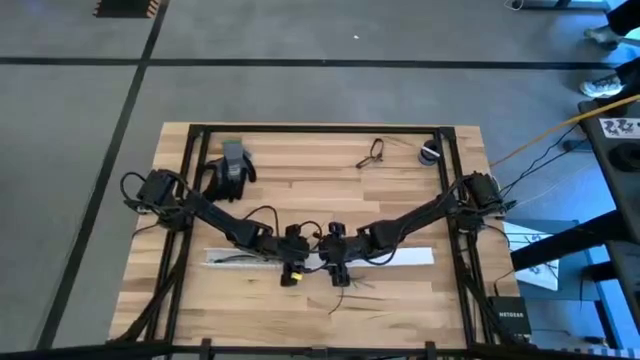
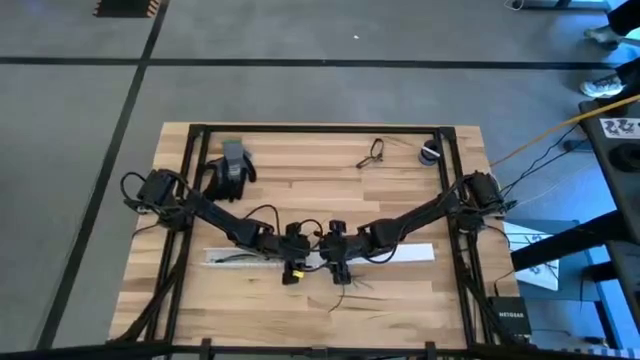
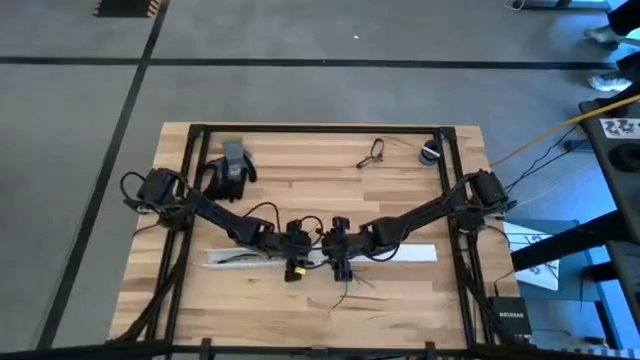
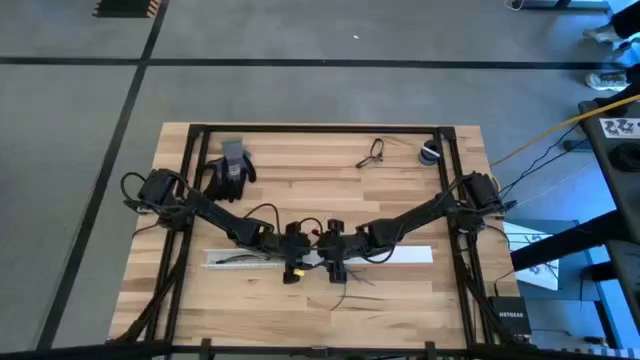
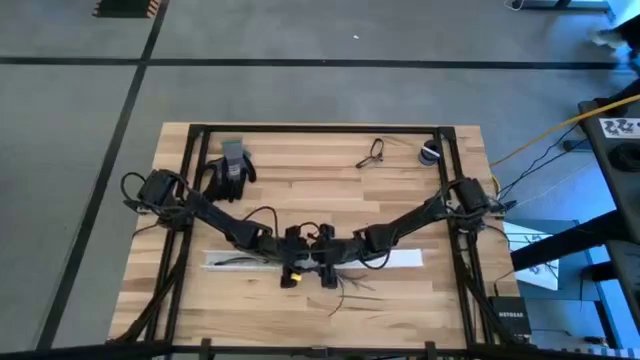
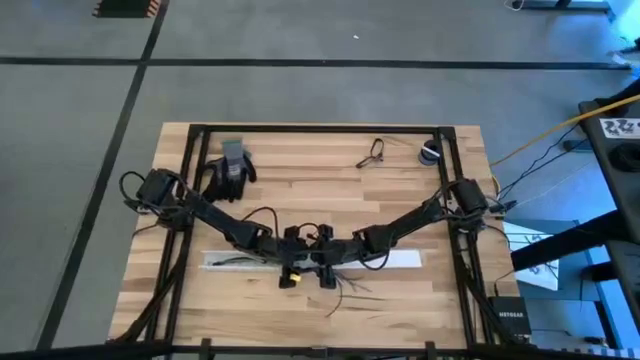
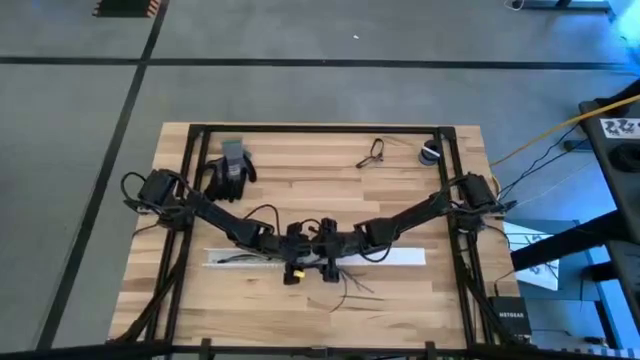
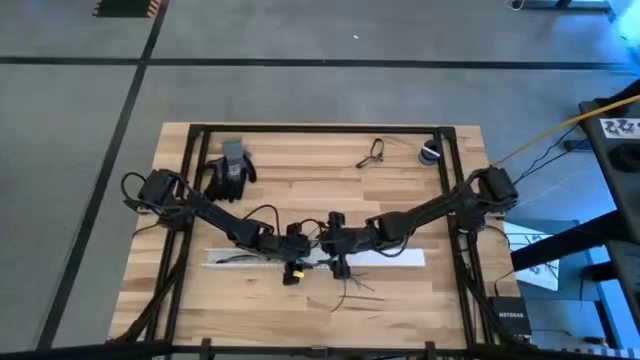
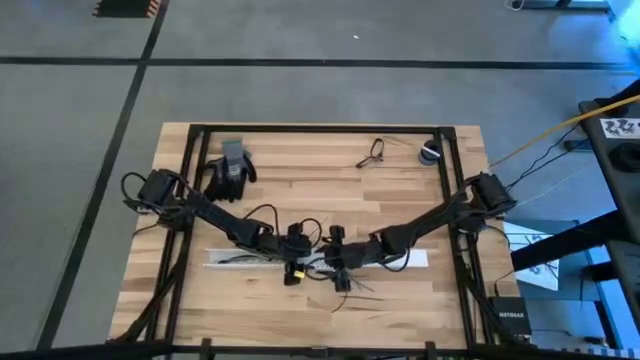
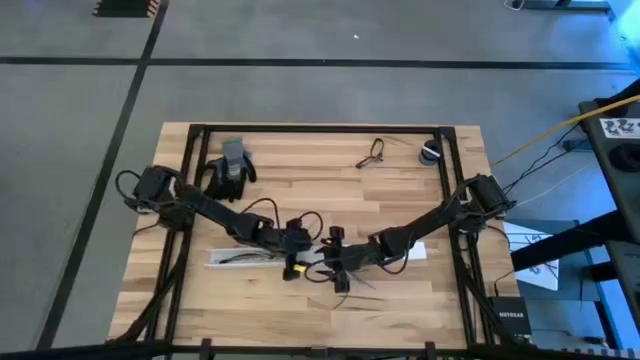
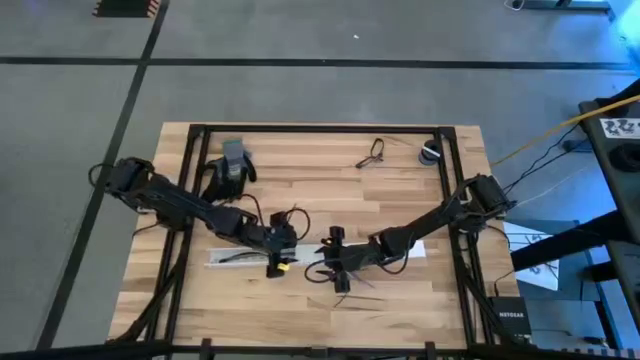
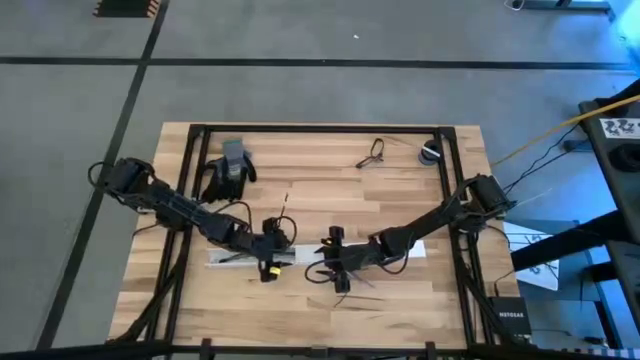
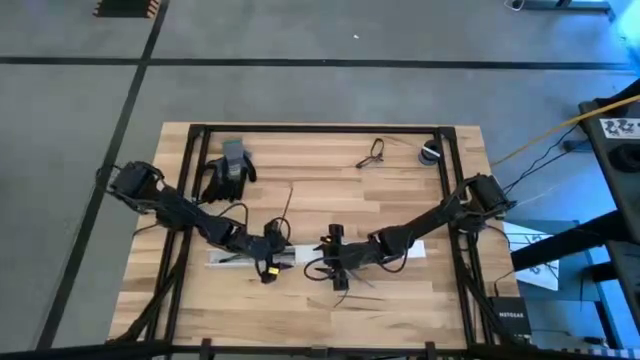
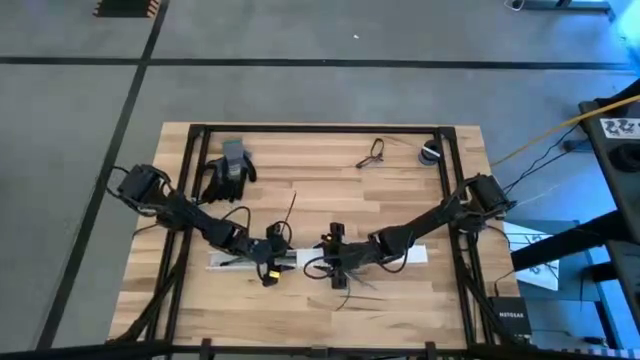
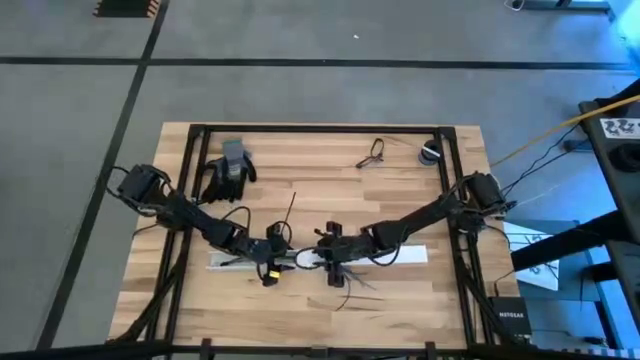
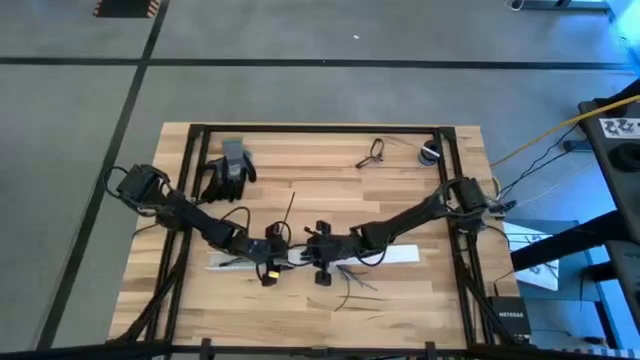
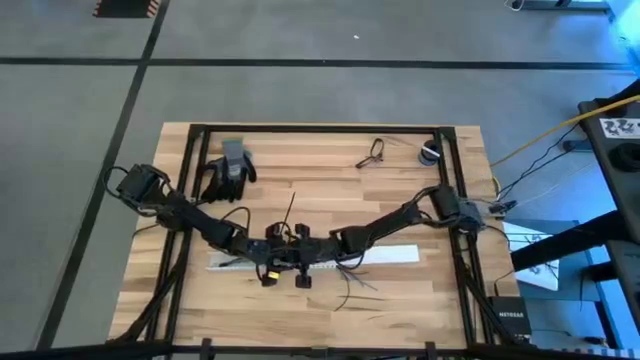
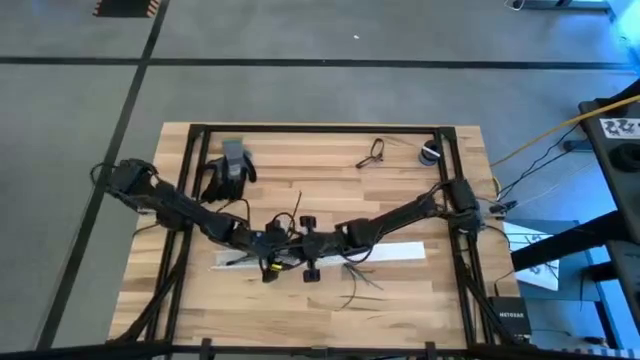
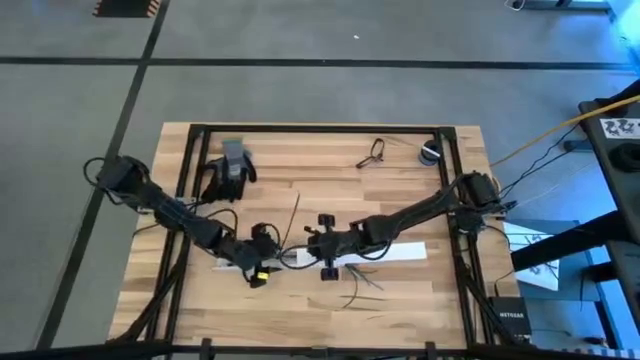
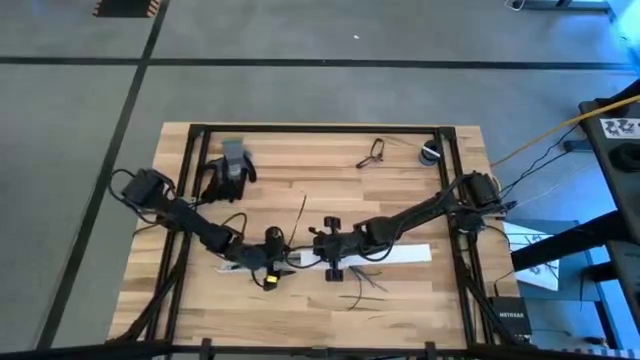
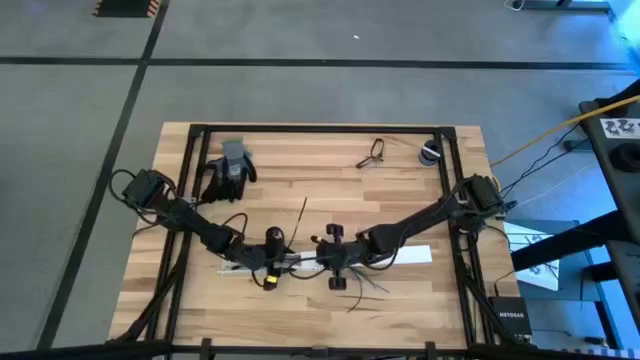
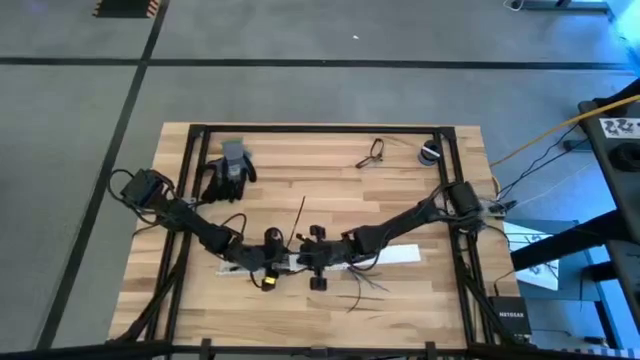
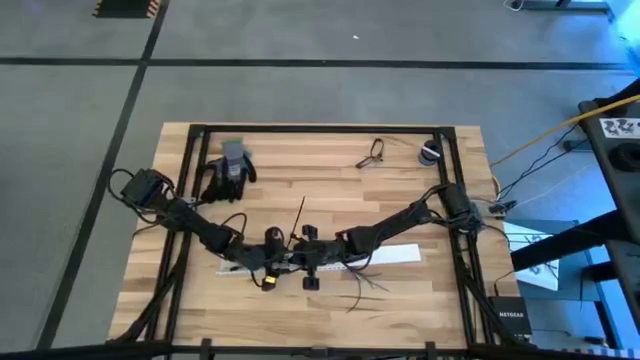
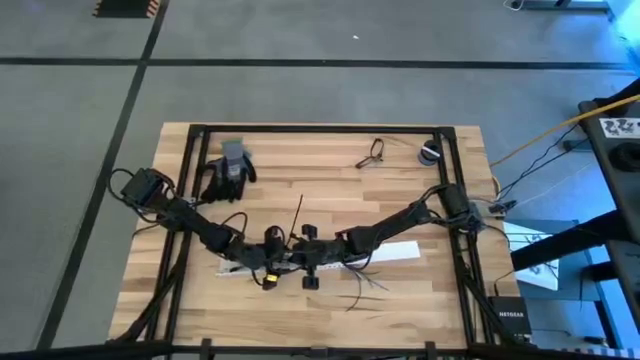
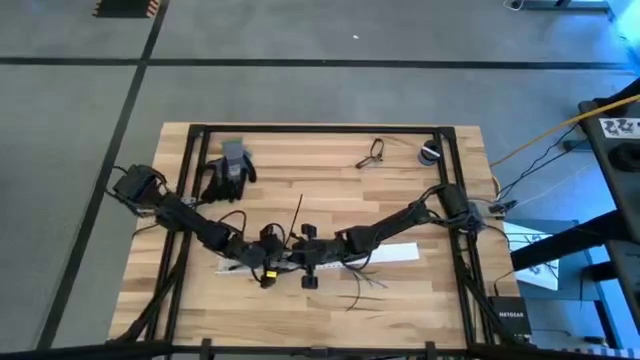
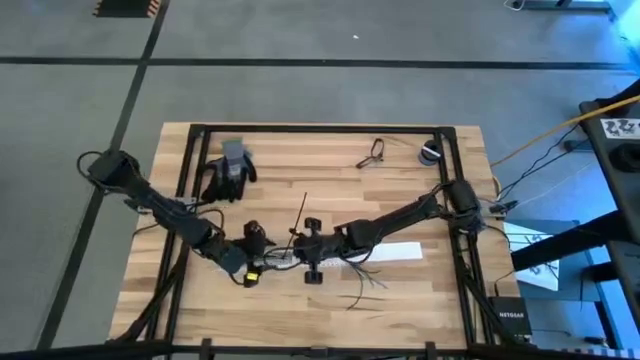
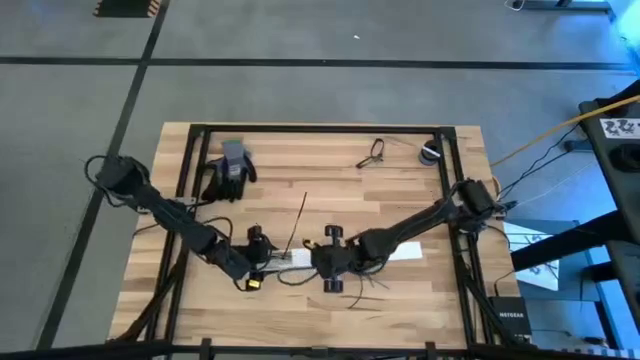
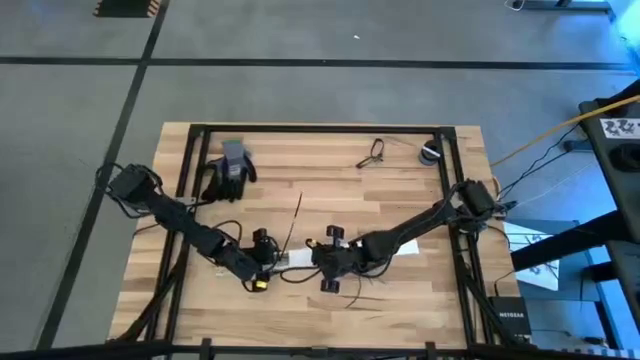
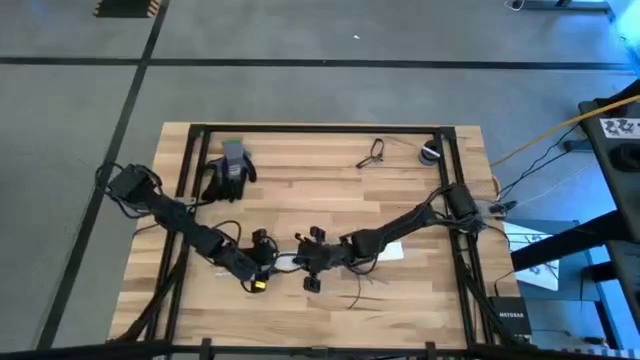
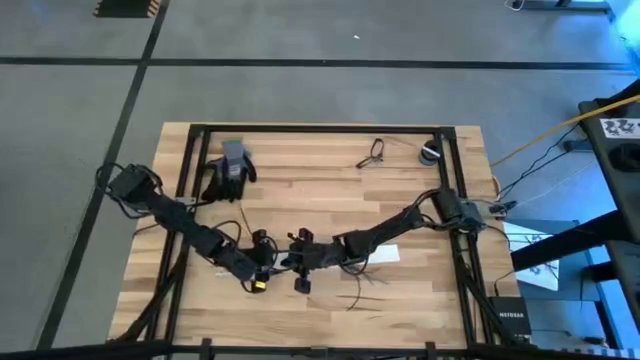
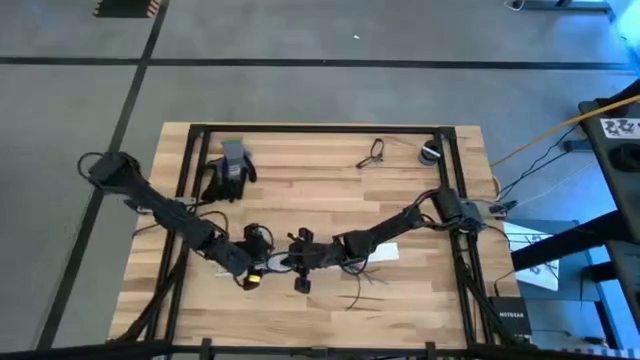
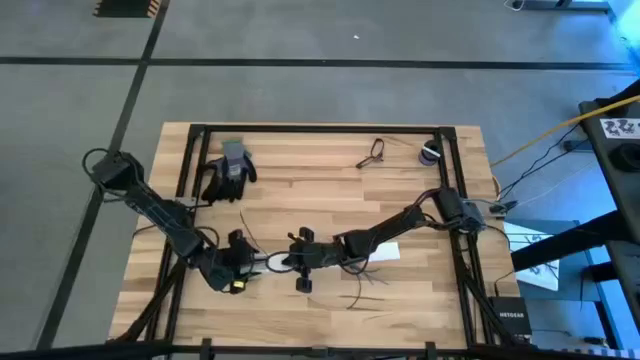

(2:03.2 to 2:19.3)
Task: Ziptie cables
Close the cable duct

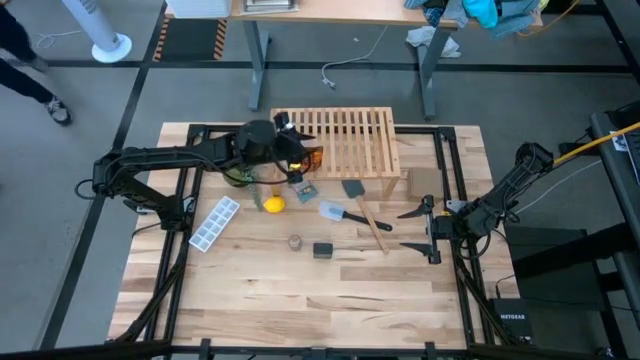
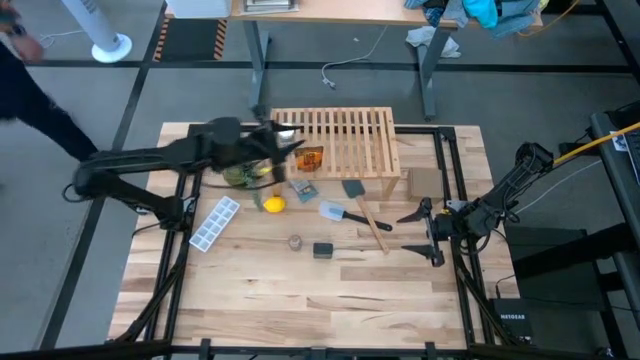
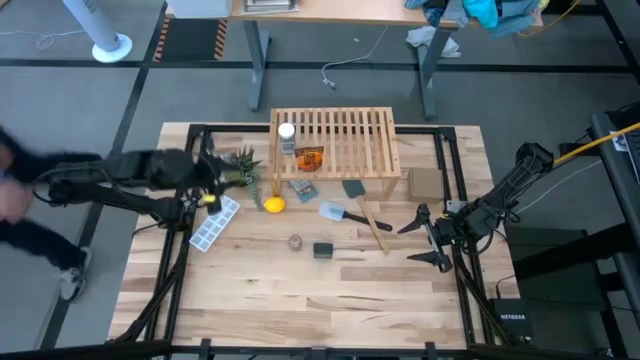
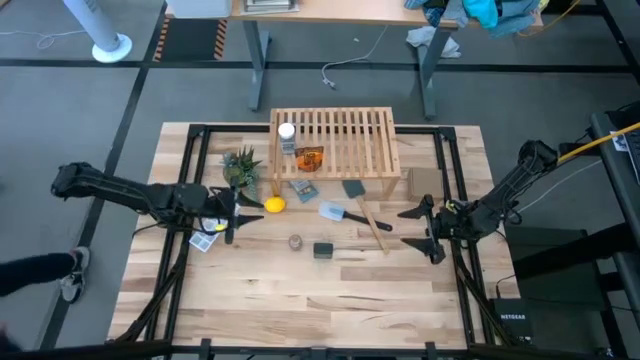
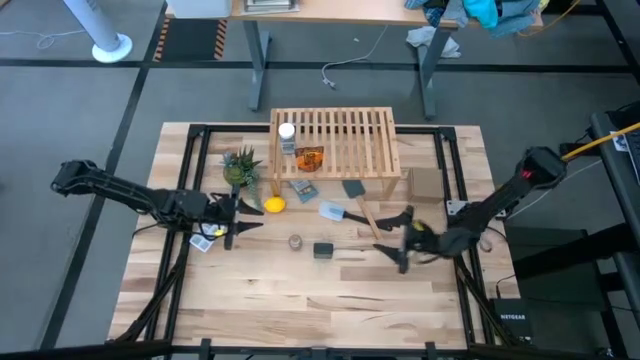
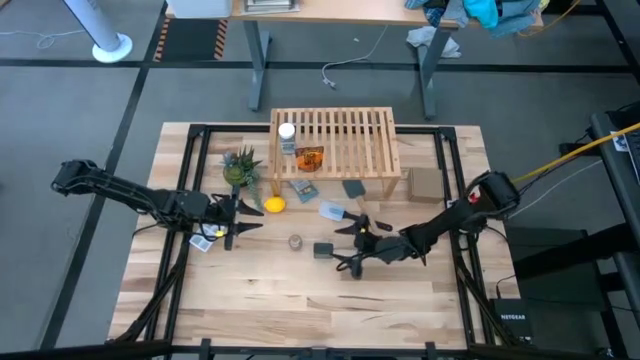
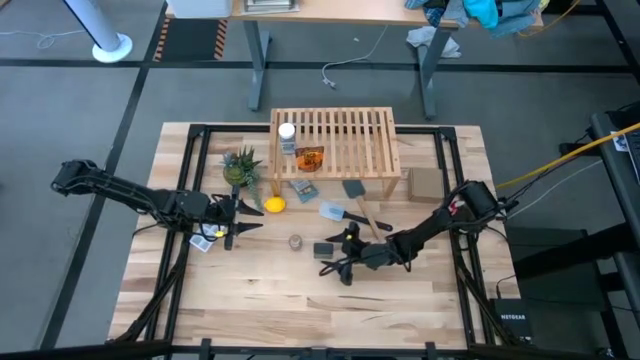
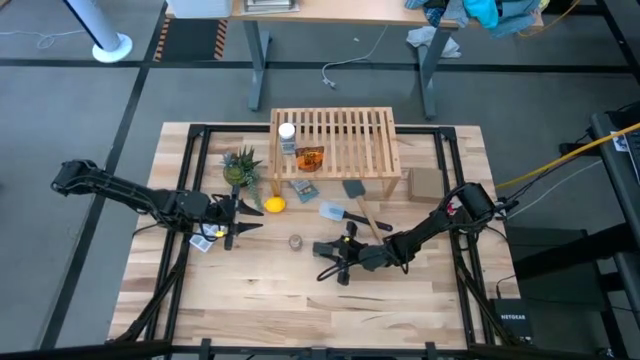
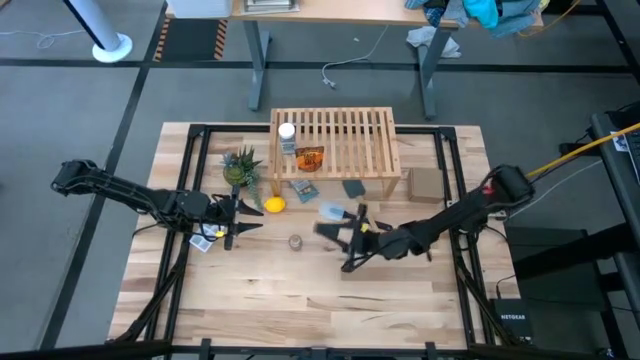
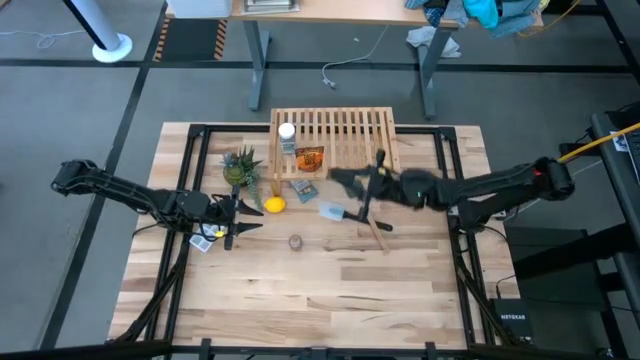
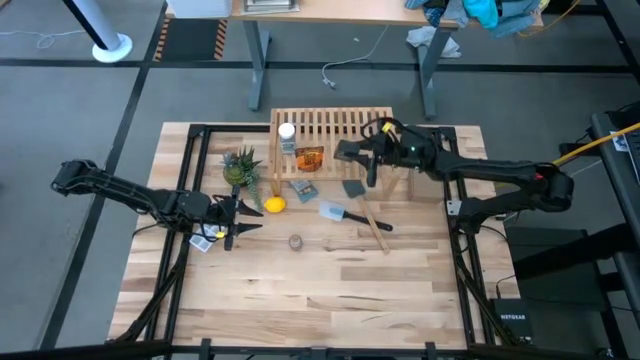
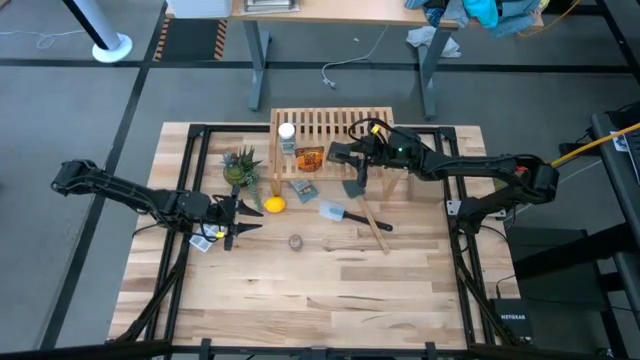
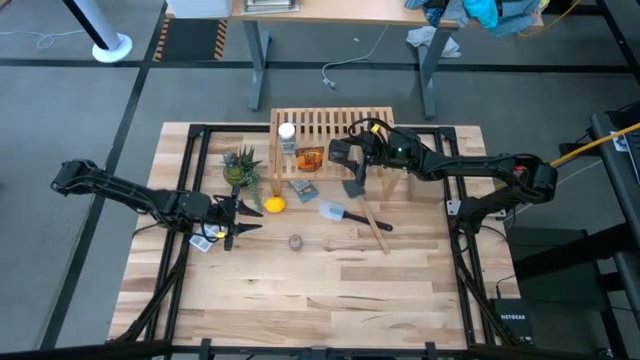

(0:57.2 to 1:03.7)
Task: Shelf spices
Put the black seasoning can on the shelf
